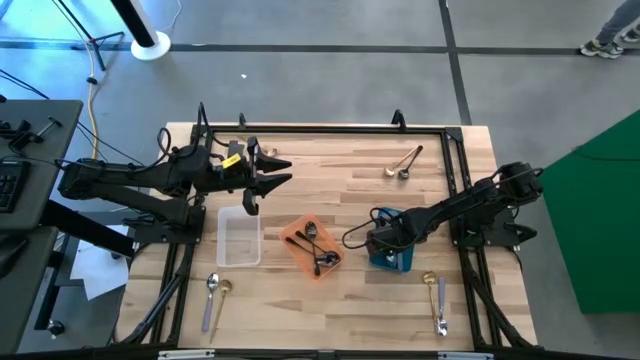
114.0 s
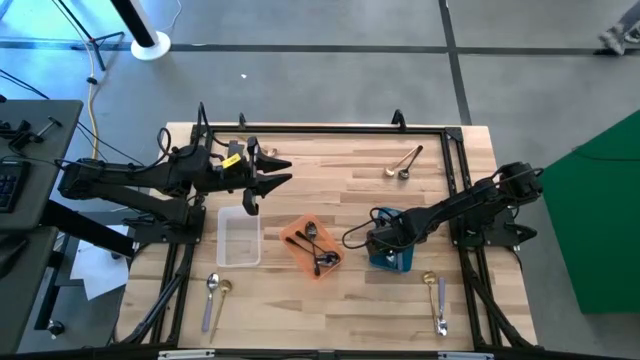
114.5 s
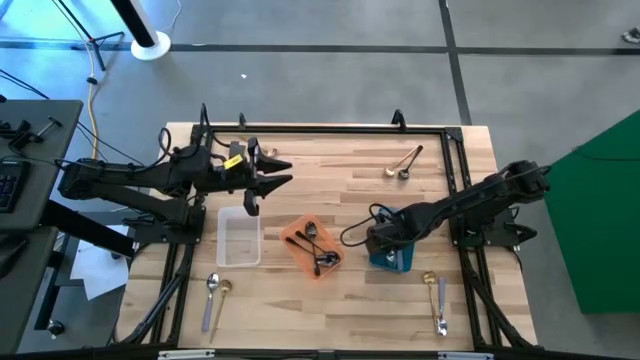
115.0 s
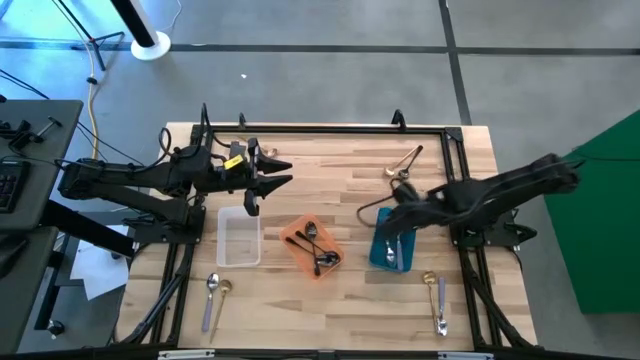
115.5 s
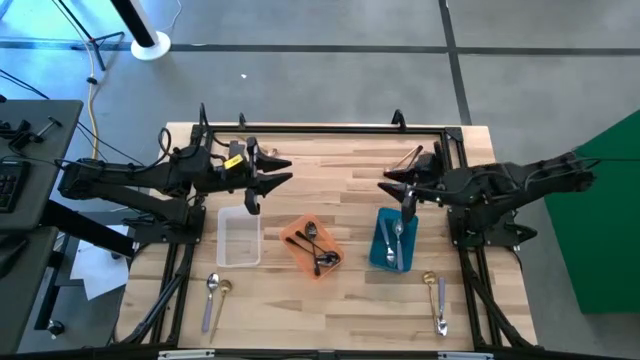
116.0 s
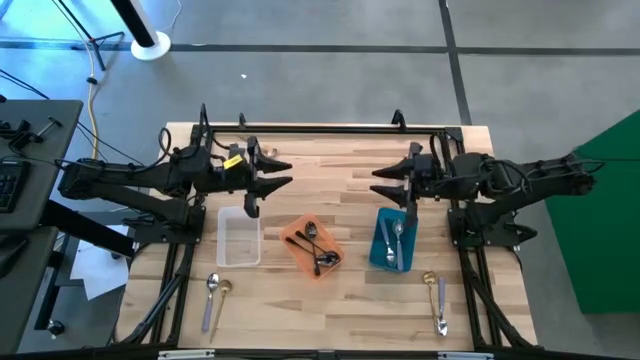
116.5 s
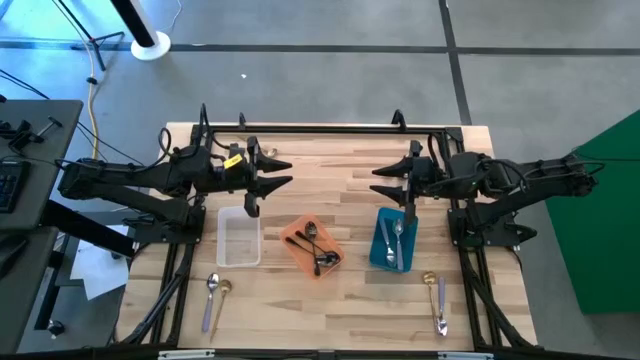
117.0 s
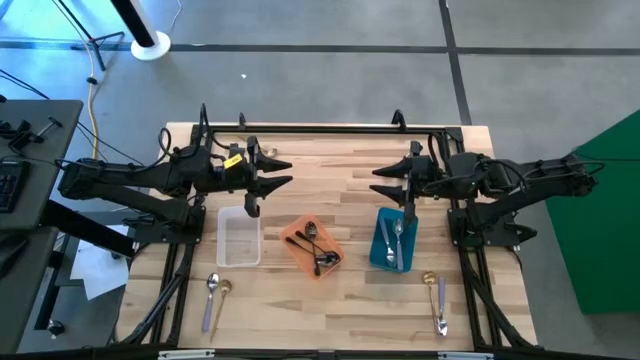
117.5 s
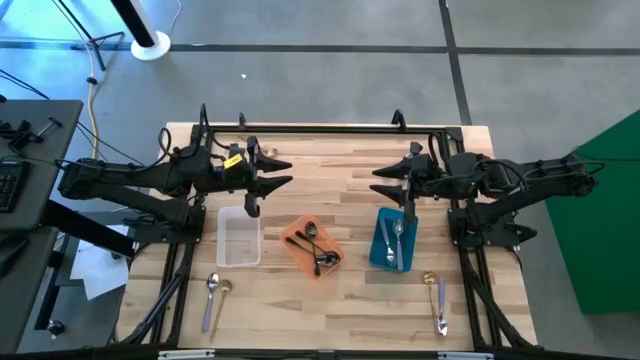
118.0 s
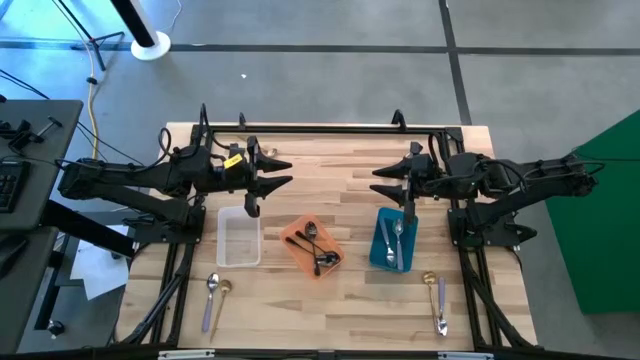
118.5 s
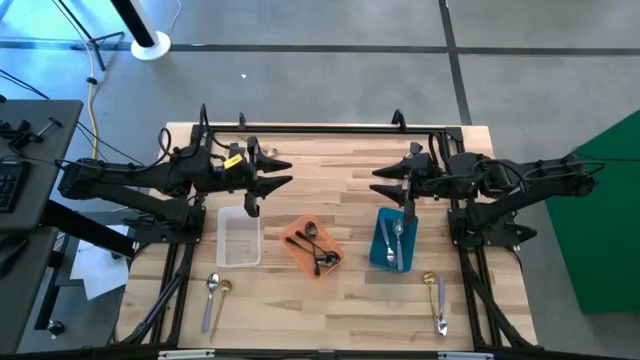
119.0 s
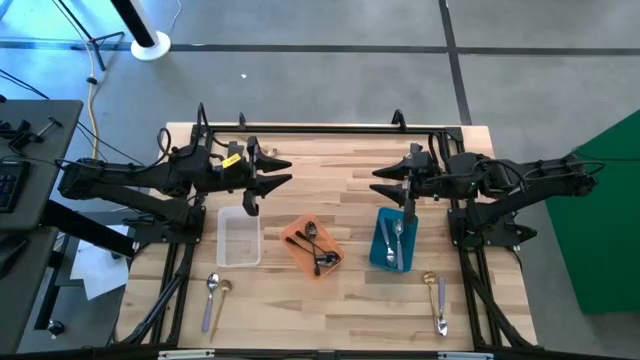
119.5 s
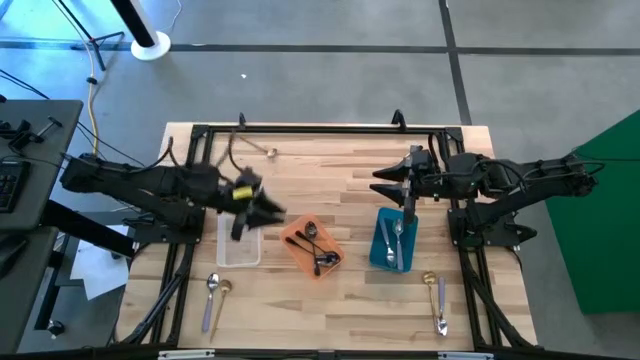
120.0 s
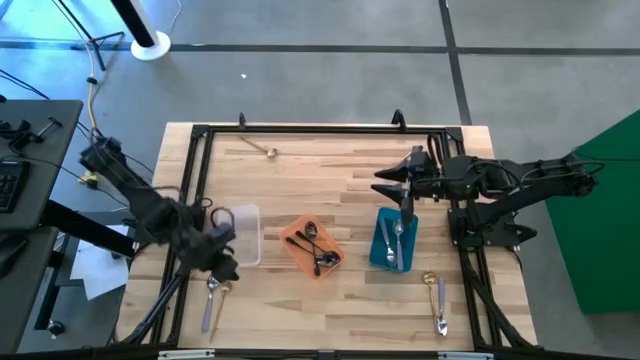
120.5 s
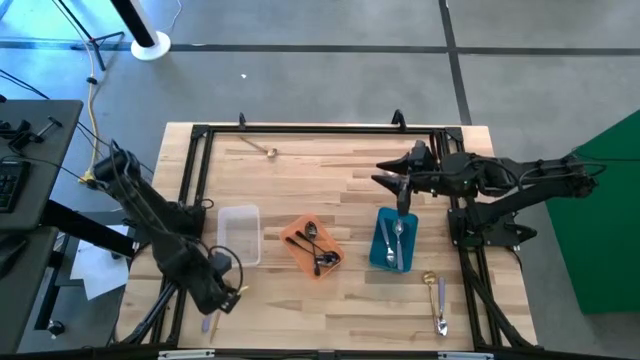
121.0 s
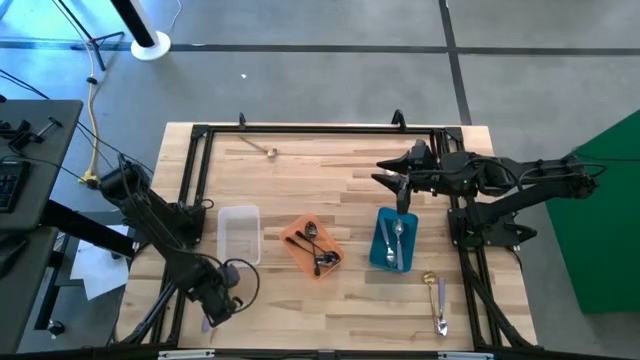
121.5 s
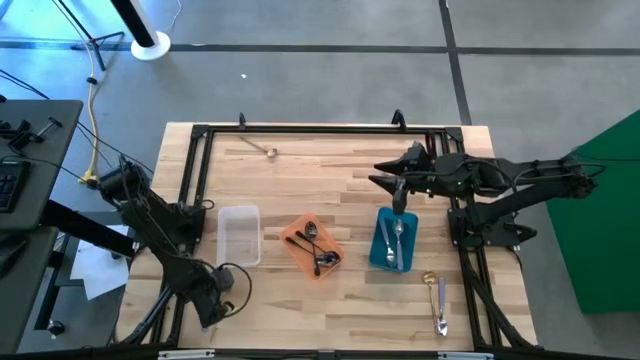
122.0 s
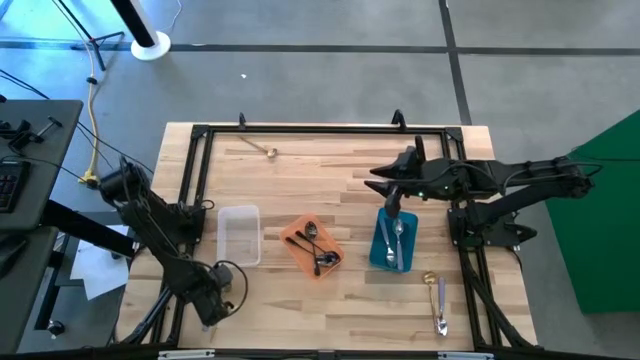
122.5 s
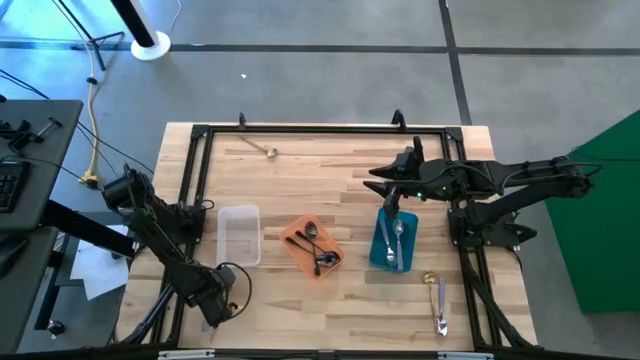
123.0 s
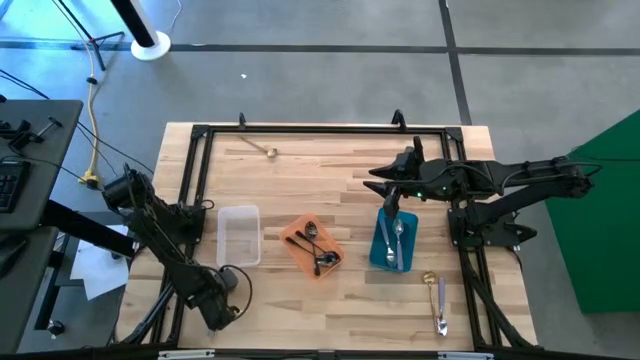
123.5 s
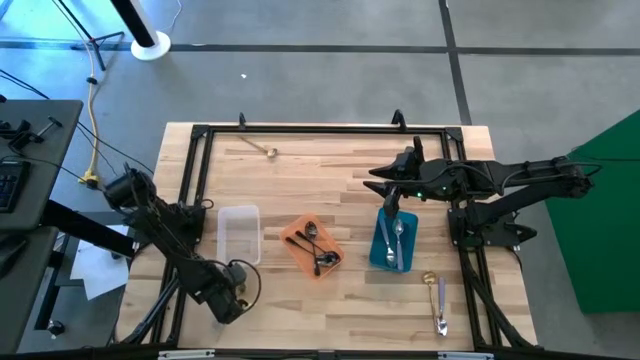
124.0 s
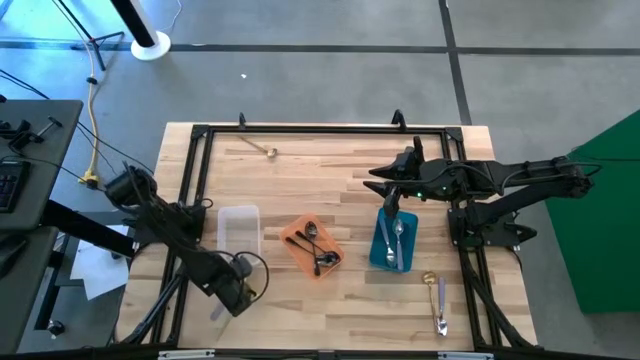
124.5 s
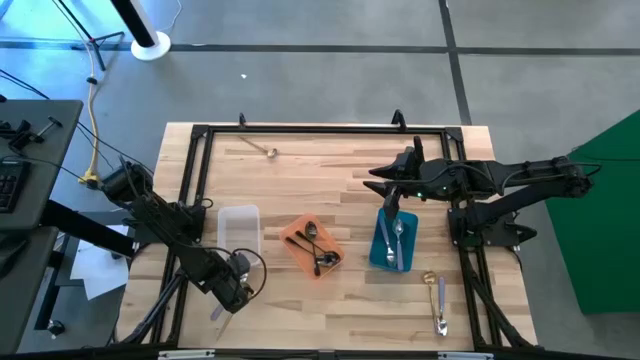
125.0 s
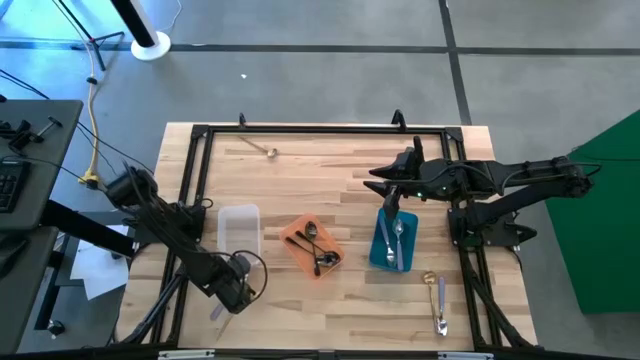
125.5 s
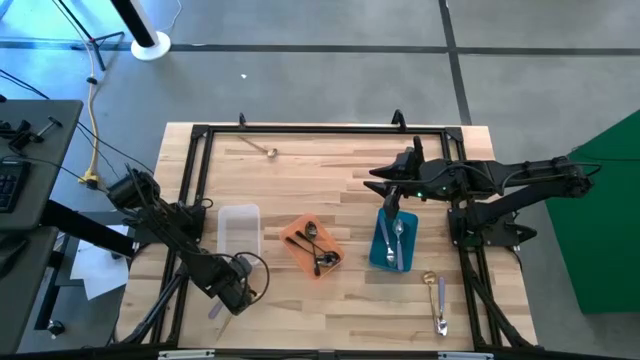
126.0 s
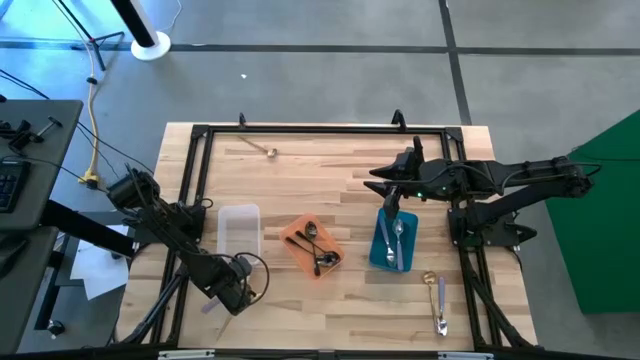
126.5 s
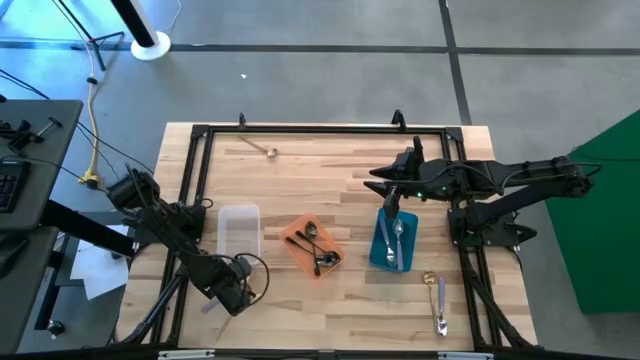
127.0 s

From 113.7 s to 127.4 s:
Task: Sort silverware by color (type)
Put the left purple spoon into the blue bin
